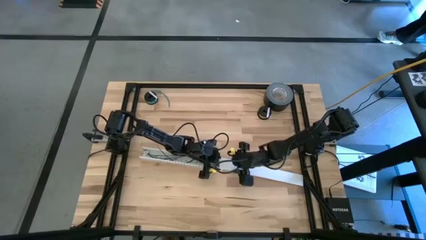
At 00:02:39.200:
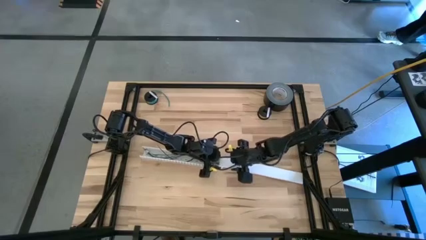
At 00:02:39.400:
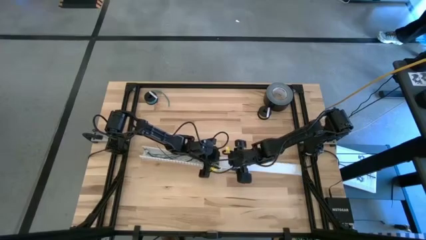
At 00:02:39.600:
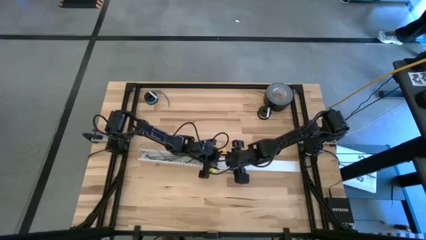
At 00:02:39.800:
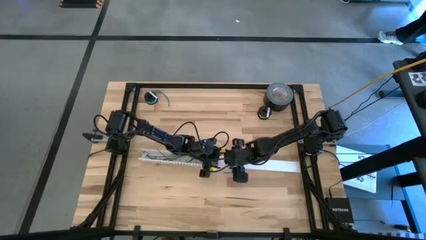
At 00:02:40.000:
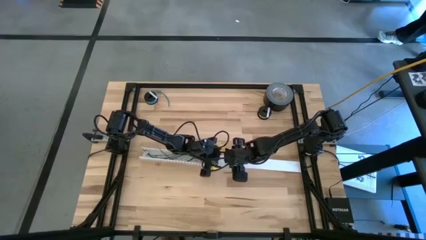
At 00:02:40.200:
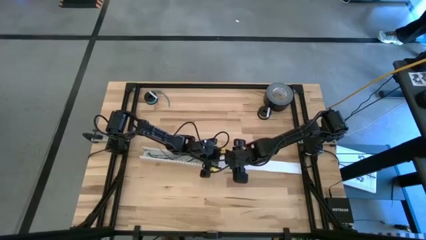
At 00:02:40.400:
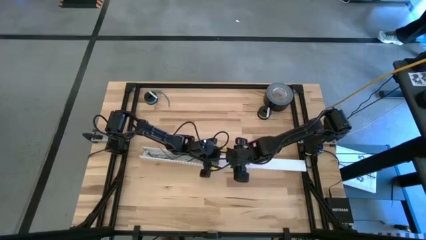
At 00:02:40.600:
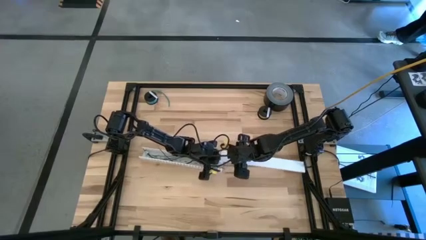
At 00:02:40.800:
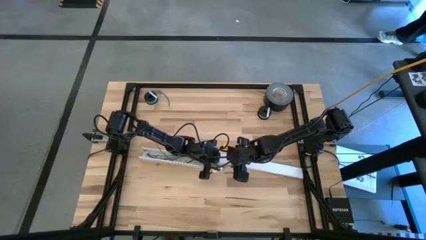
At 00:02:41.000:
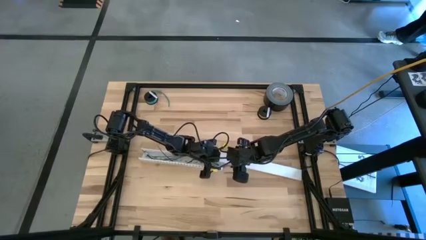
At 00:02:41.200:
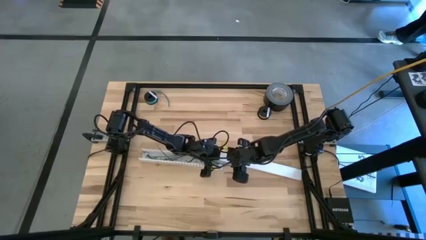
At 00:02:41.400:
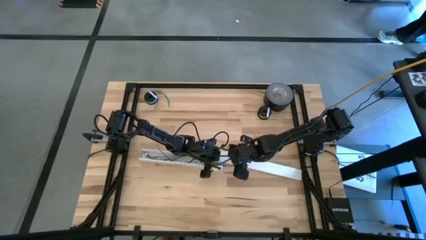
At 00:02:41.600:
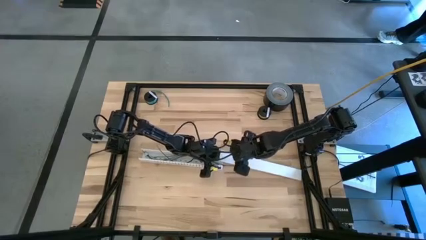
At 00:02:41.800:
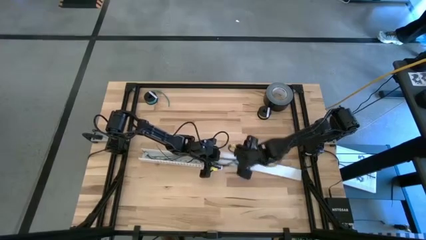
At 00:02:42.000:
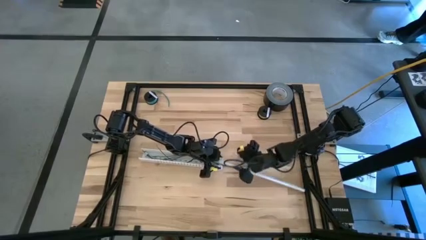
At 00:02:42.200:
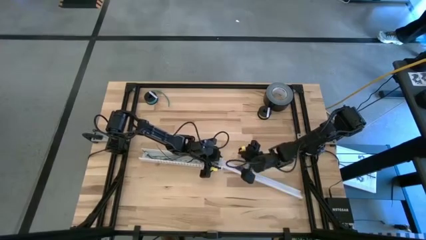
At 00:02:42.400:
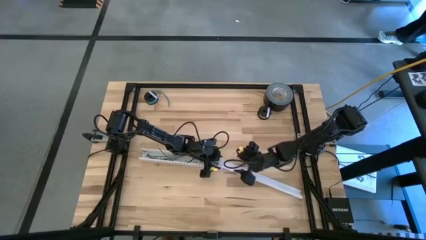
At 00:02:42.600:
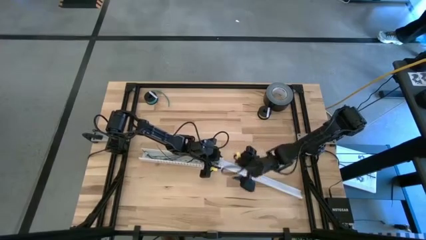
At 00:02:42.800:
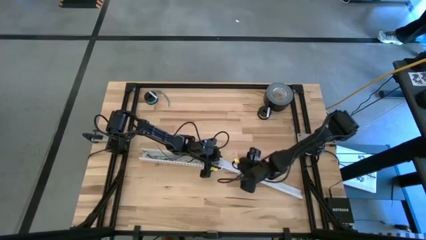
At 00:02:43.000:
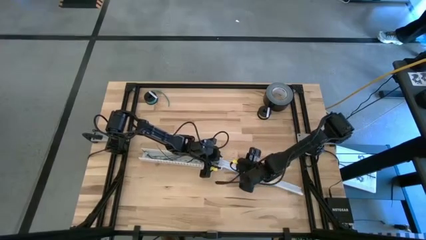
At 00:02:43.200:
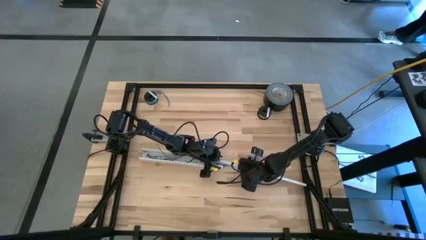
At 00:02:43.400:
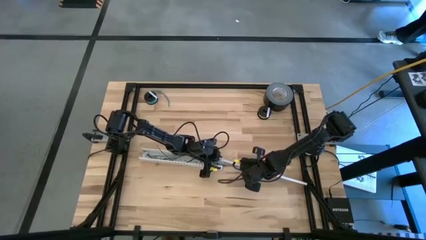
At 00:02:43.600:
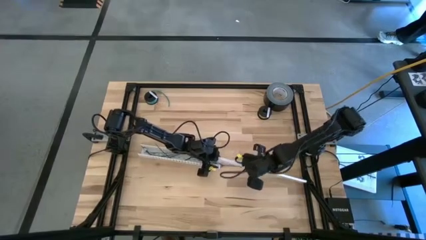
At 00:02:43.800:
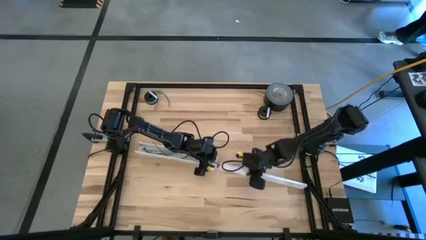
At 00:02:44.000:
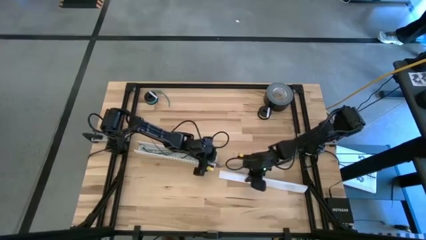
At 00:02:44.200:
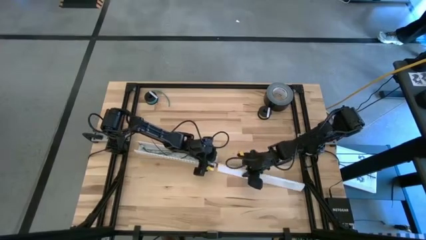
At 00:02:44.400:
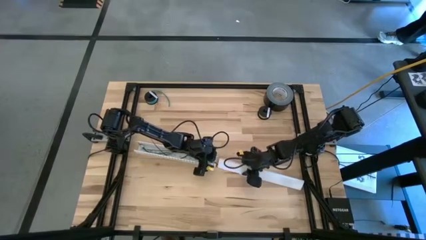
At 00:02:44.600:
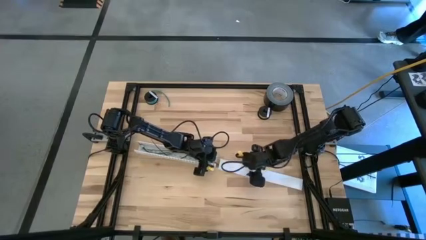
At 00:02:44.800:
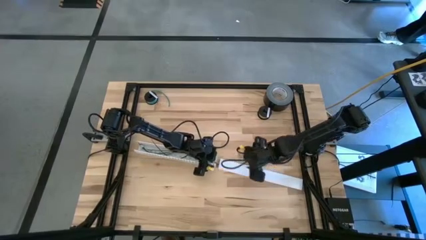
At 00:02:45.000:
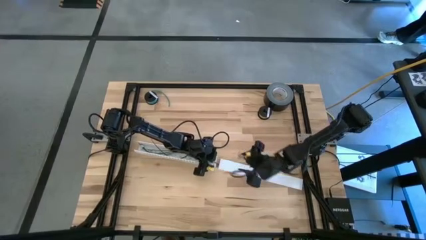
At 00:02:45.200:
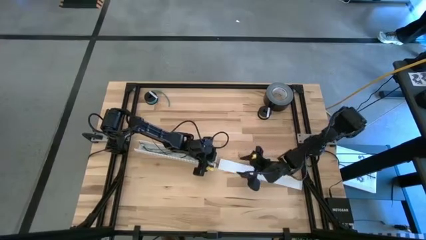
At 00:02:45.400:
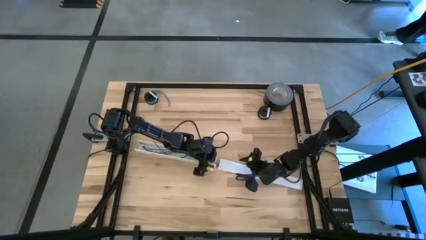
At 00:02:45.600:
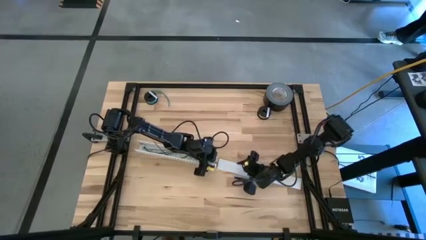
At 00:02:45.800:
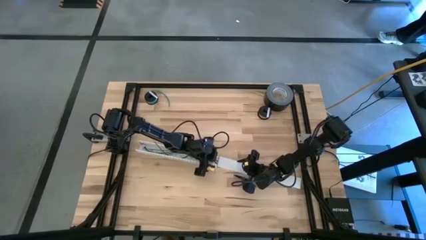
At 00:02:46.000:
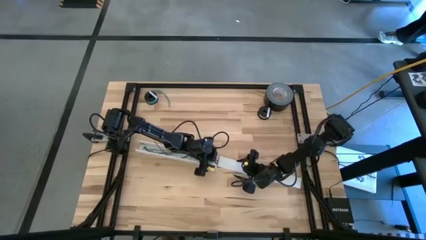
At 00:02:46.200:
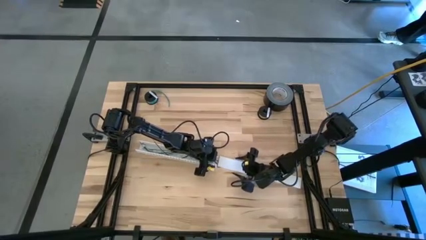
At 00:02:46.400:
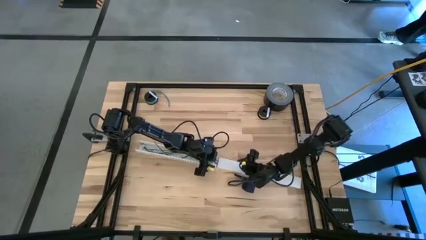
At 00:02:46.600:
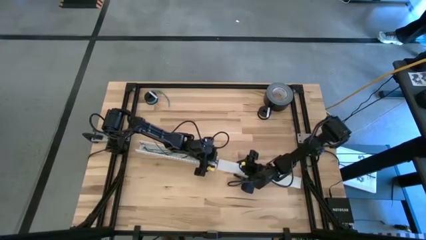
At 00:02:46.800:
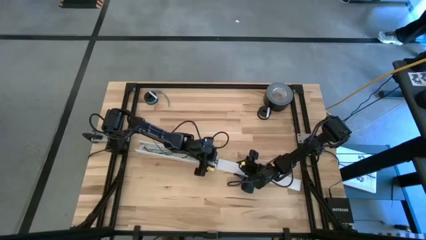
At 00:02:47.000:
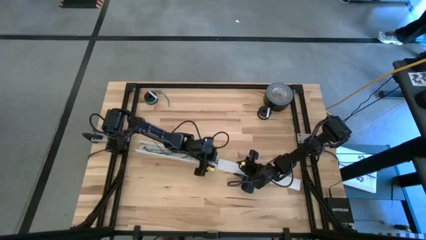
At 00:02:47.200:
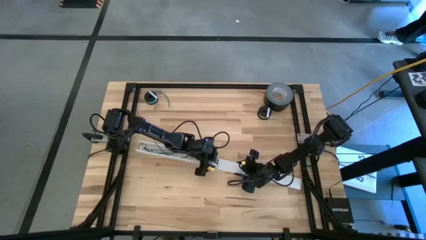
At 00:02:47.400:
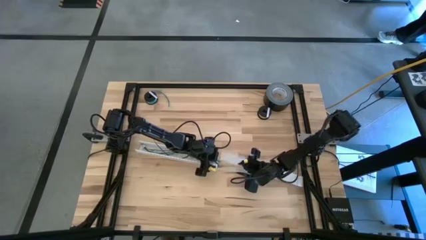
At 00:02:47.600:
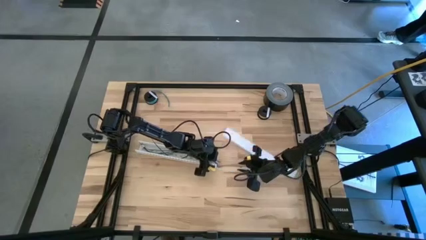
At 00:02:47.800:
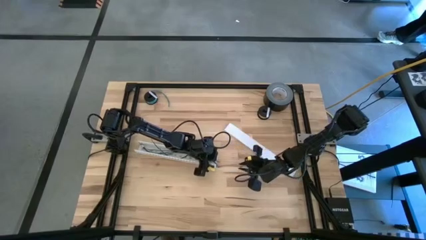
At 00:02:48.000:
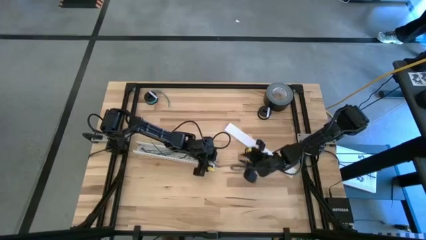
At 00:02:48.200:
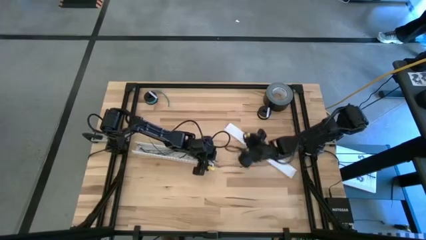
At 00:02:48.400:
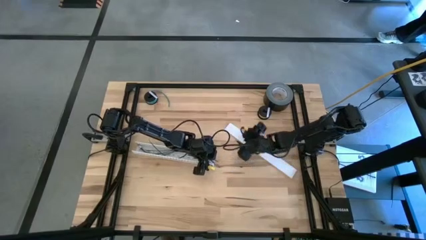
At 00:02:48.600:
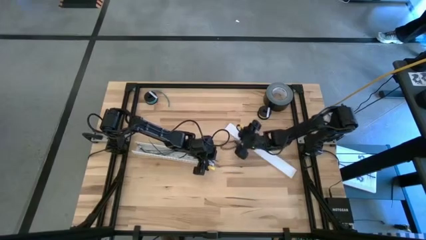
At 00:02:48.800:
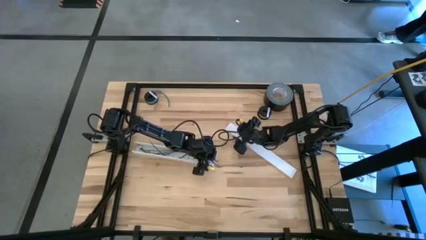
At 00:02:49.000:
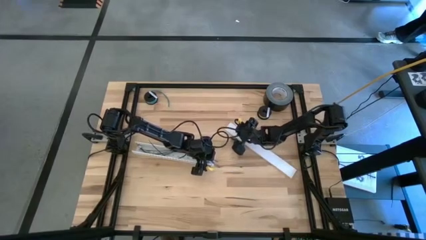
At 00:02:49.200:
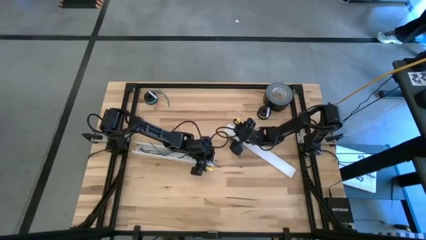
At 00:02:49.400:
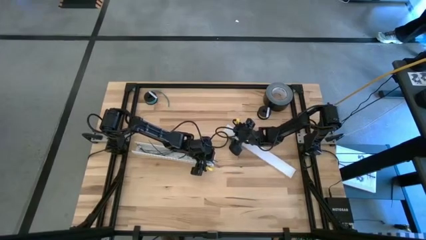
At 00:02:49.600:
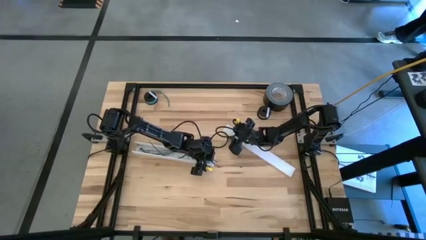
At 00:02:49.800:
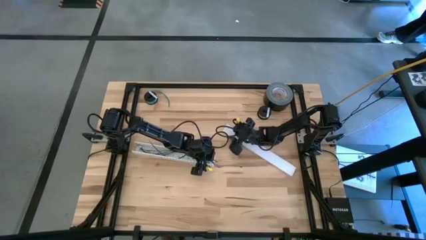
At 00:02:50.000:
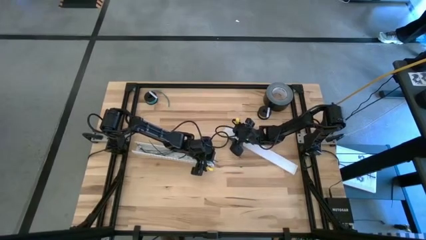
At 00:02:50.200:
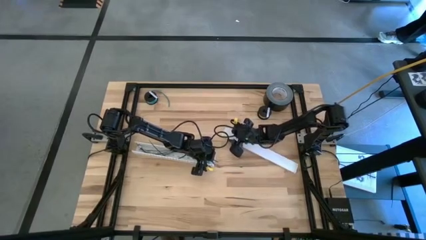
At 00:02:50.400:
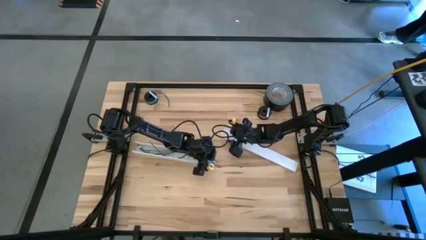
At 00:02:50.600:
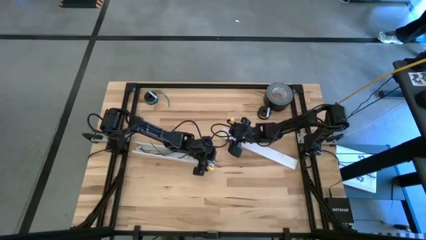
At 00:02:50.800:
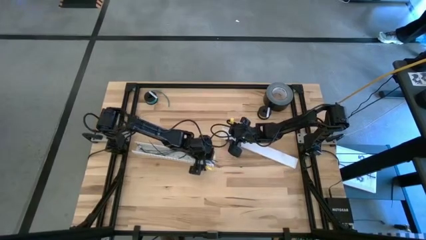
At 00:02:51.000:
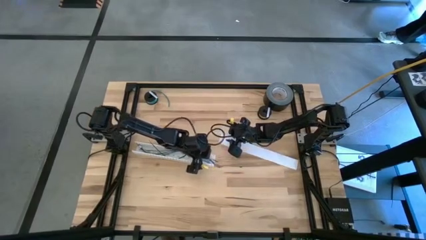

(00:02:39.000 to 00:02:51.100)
Task: Ziptie cables
Close the white cable duct

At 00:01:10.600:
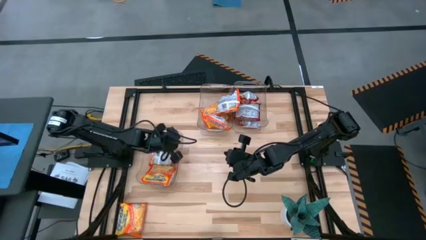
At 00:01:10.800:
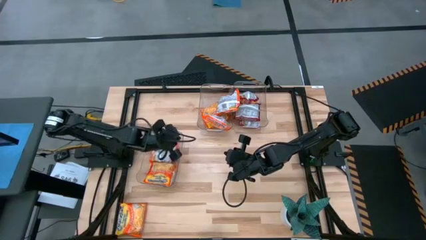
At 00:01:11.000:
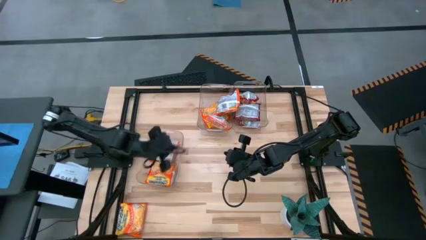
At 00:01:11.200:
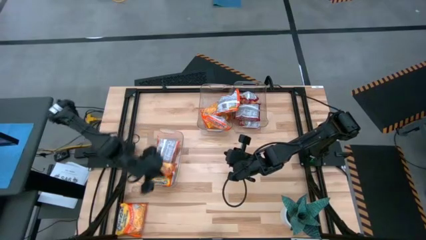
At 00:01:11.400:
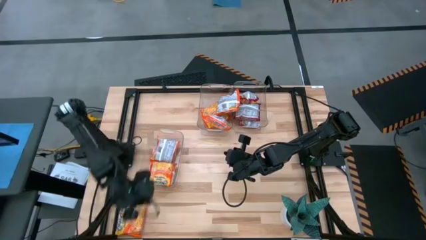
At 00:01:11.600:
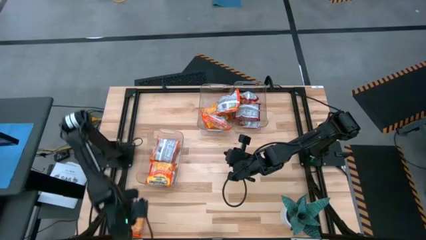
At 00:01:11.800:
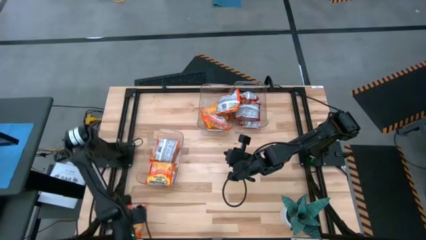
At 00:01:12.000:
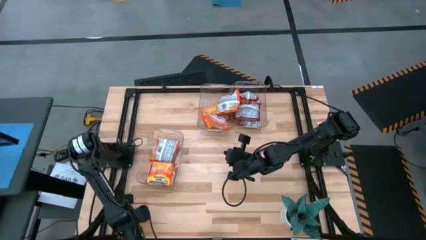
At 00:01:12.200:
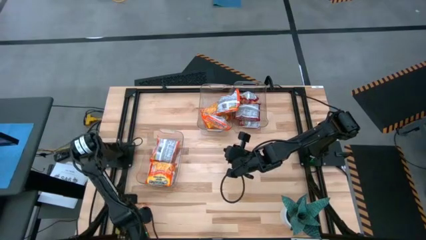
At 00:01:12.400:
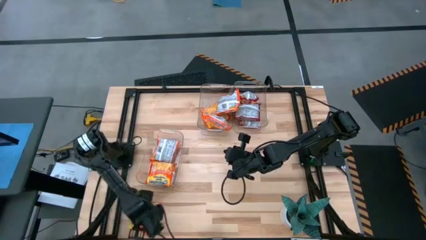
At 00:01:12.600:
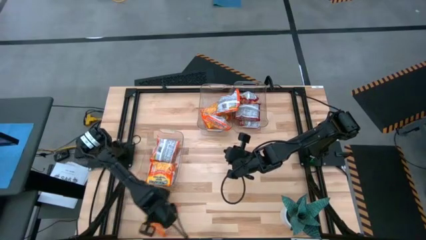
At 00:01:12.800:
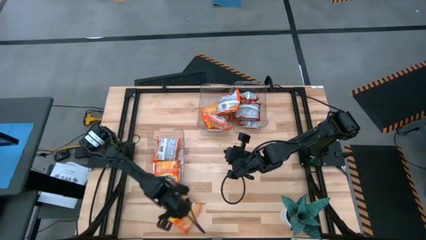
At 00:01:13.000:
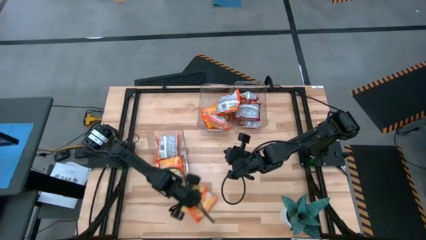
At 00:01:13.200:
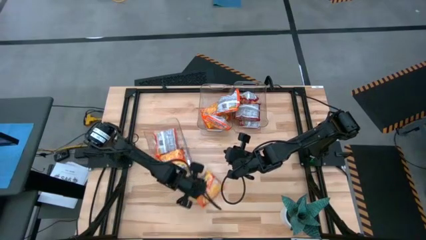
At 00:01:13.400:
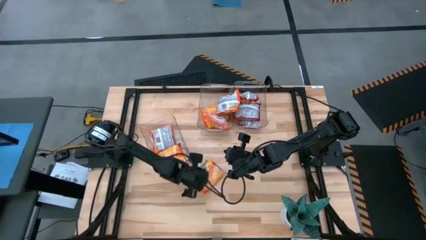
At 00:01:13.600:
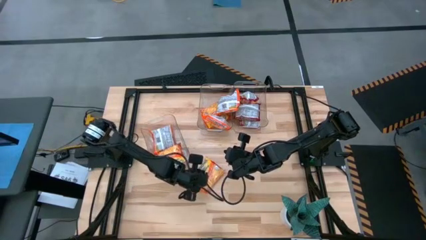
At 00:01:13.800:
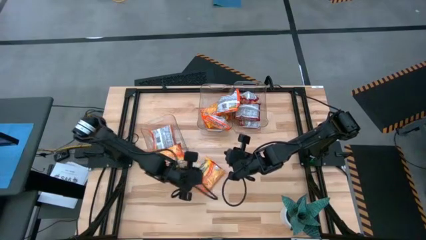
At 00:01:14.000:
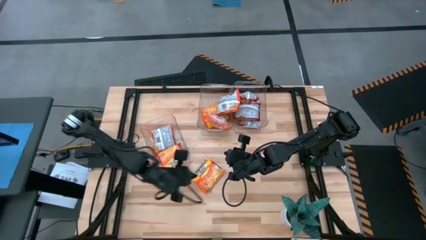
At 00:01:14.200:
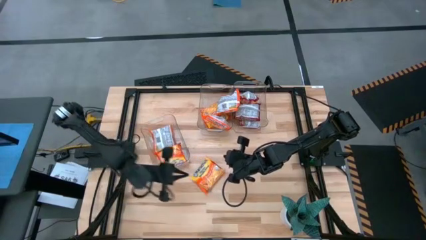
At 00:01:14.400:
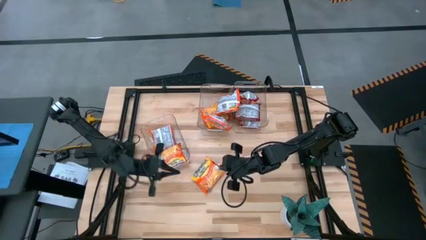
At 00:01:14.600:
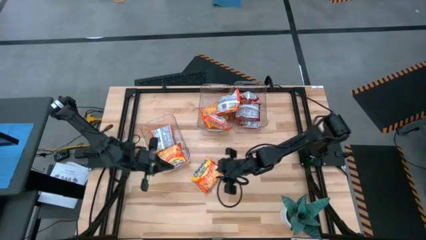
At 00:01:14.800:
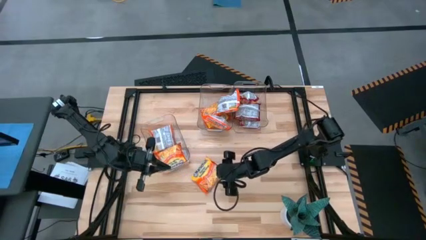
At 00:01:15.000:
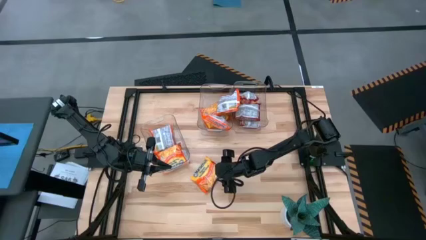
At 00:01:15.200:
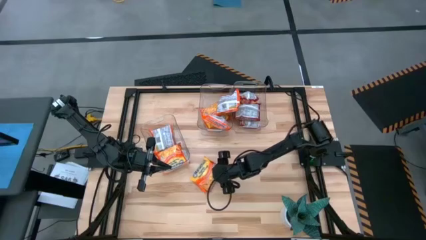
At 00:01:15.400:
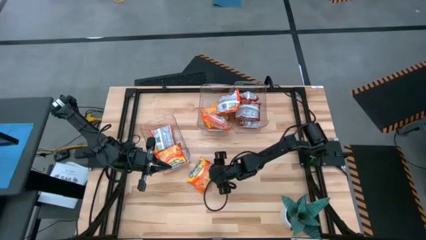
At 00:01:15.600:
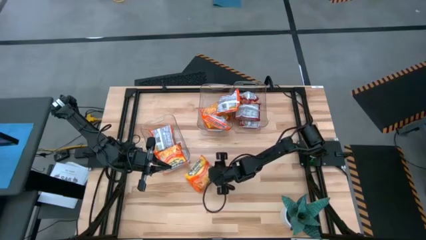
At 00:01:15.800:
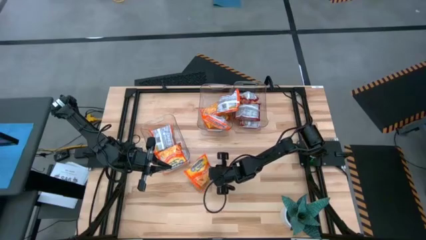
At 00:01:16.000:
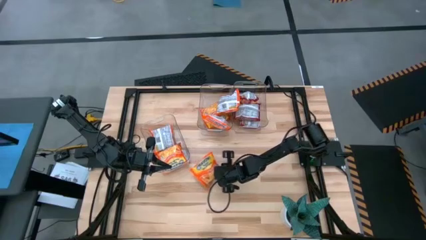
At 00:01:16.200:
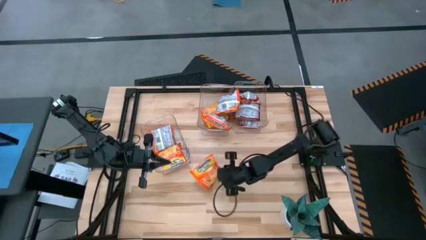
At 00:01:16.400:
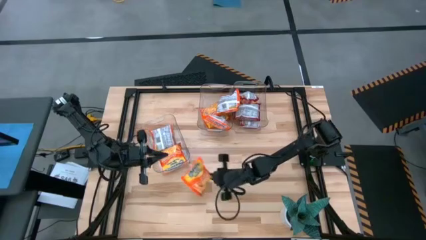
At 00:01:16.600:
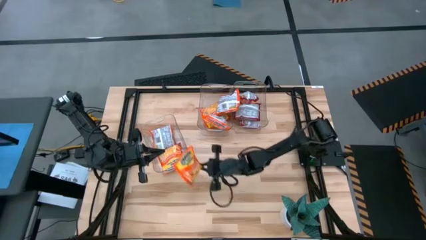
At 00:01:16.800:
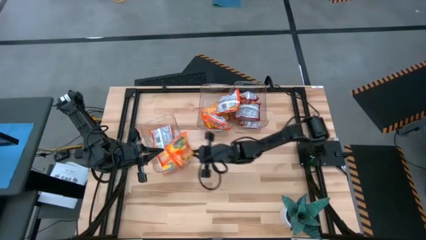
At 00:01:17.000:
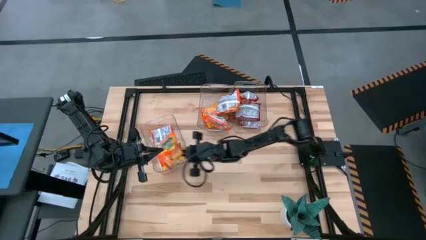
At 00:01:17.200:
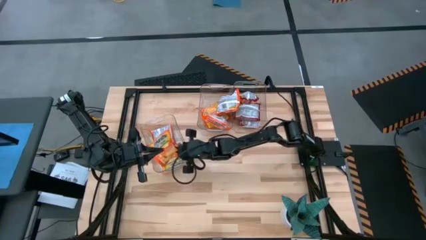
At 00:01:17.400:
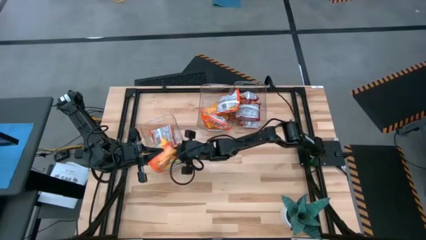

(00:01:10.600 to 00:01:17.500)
Task: Sort Maruchan noodles
Put the orange noodle pack into the bottom left transparent bin
